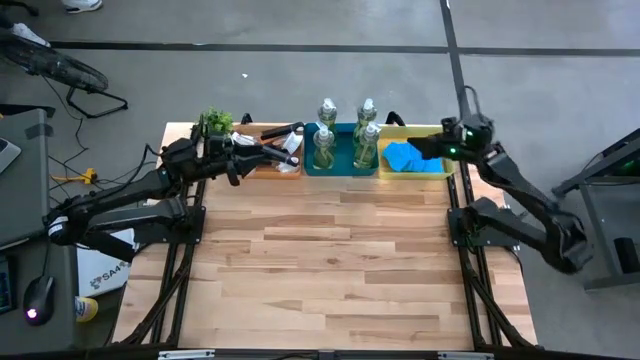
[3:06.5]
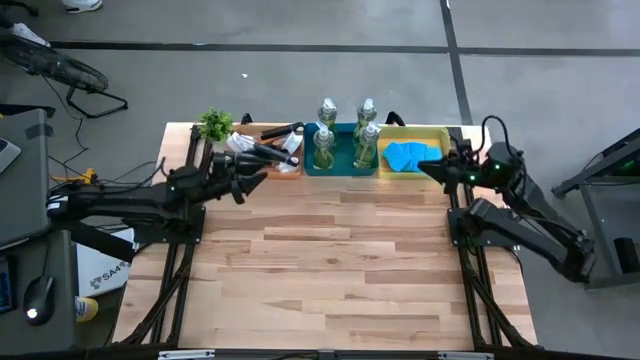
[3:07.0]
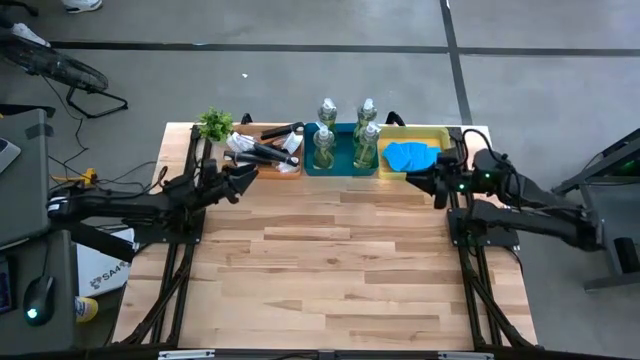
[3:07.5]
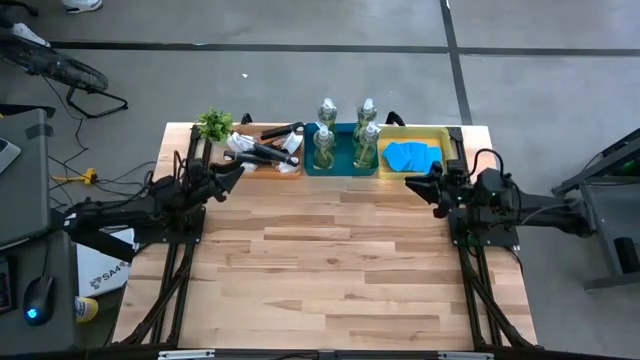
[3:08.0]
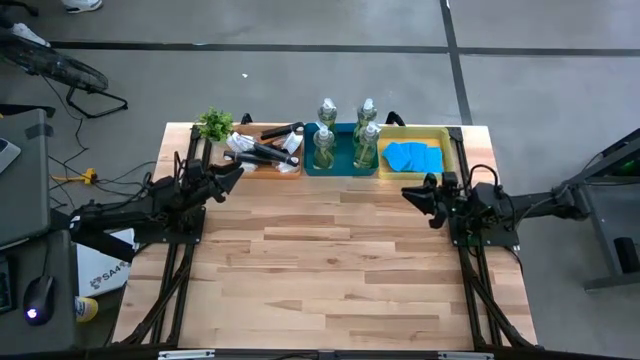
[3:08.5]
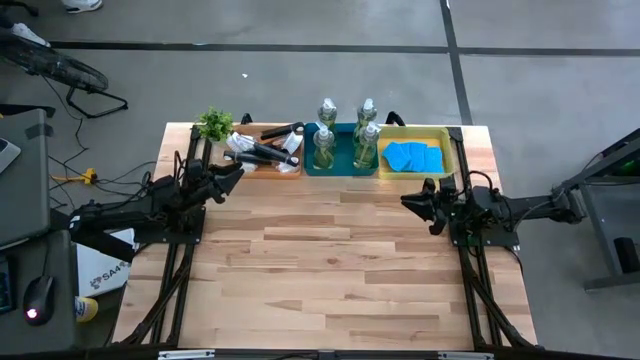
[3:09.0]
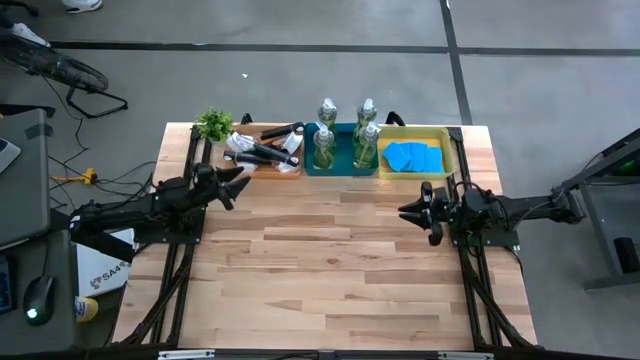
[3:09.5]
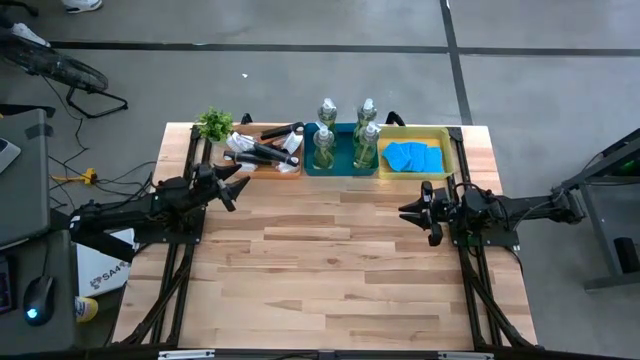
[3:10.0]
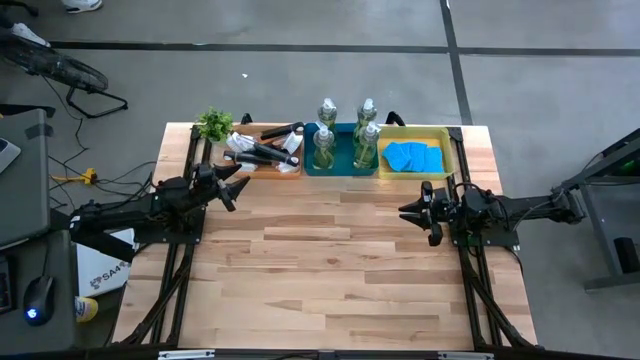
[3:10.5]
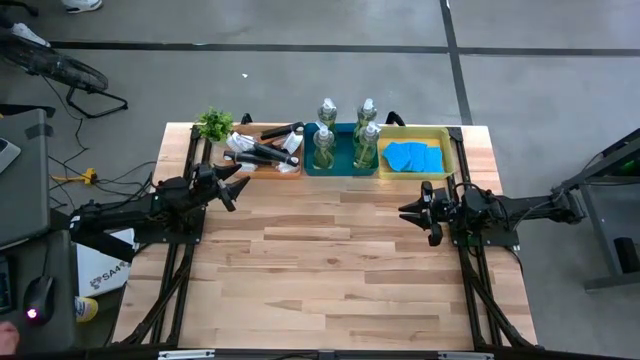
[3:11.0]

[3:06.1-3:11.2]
Task: Pick & Place Kitchen Sink Supplies
Return to Home Position

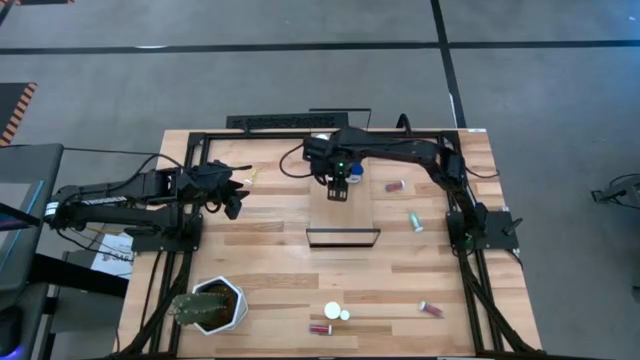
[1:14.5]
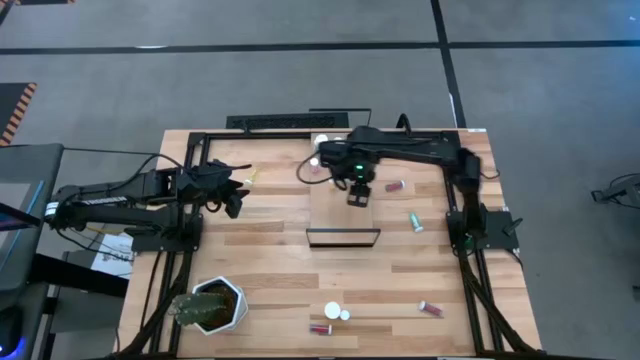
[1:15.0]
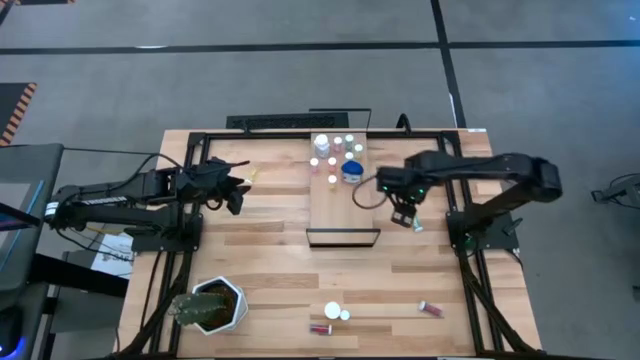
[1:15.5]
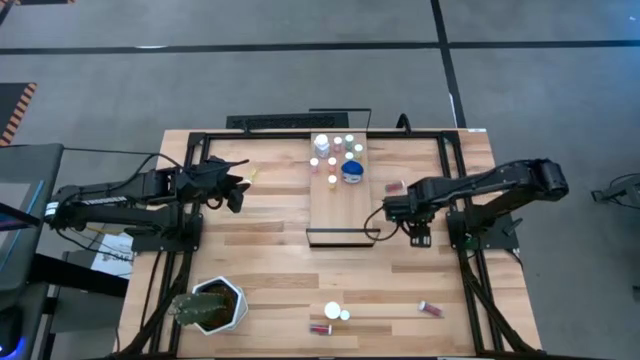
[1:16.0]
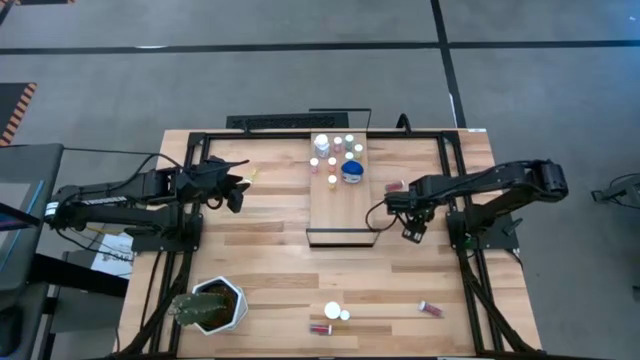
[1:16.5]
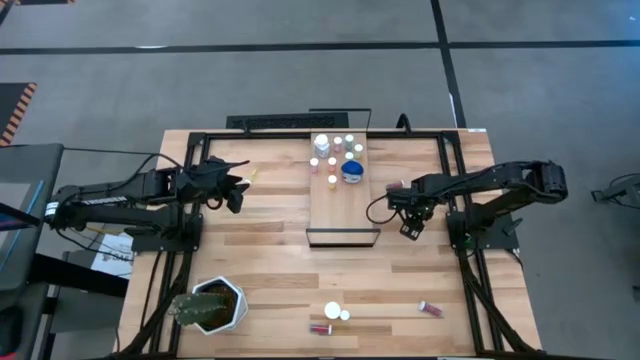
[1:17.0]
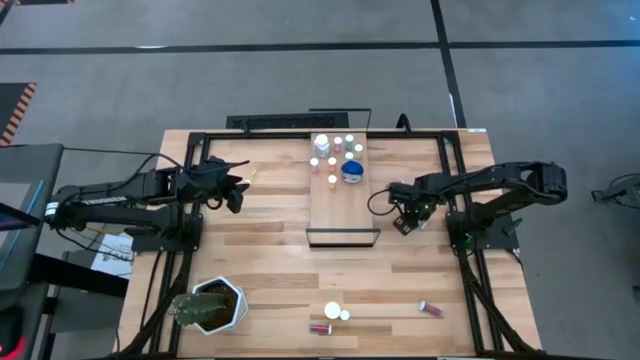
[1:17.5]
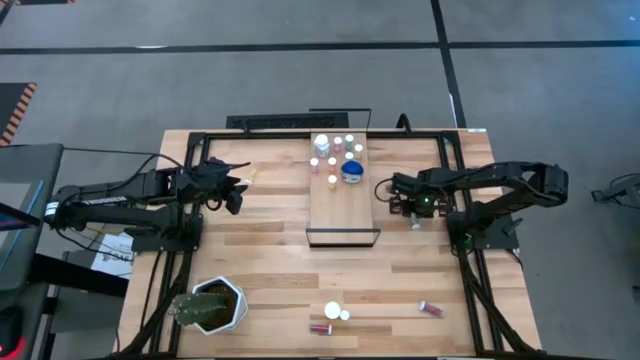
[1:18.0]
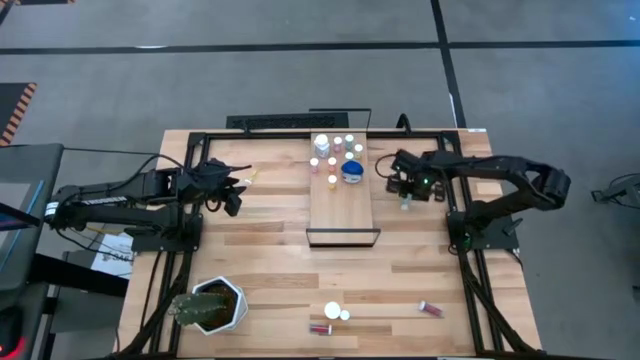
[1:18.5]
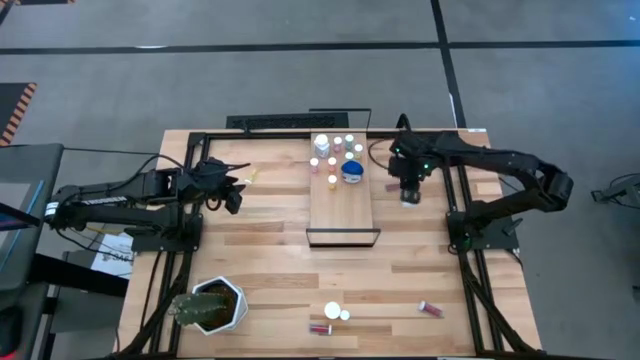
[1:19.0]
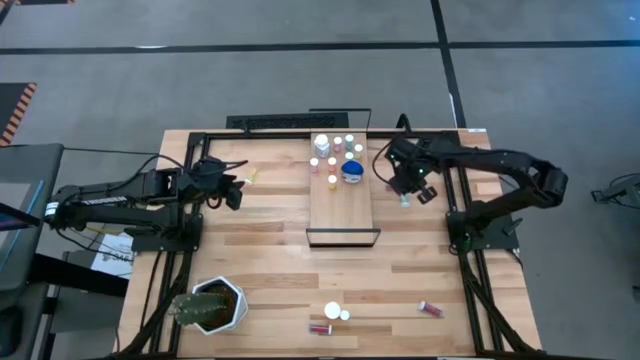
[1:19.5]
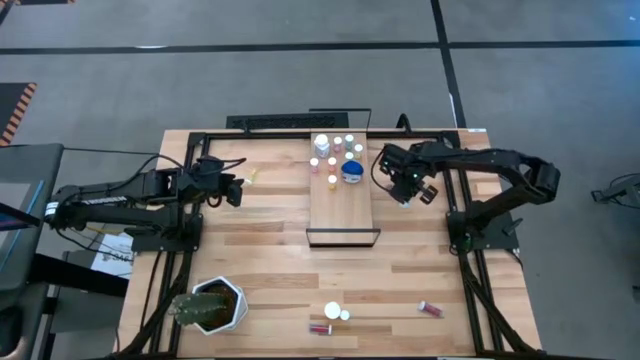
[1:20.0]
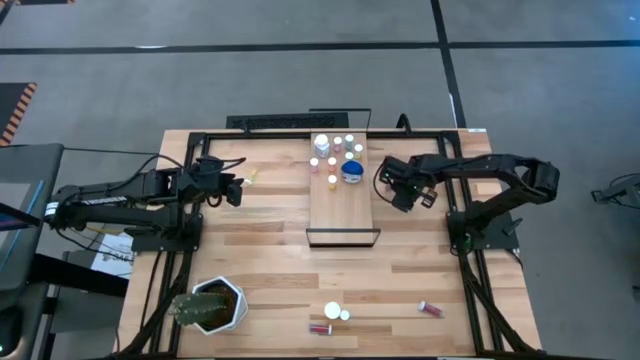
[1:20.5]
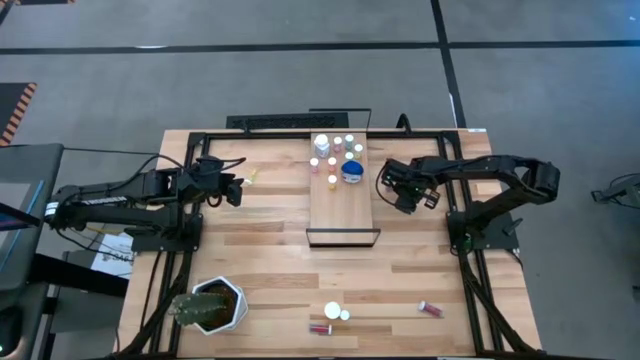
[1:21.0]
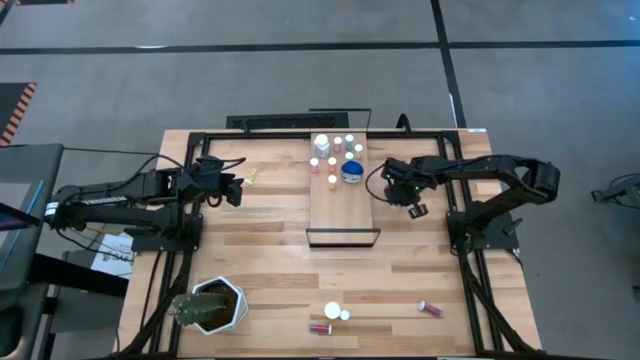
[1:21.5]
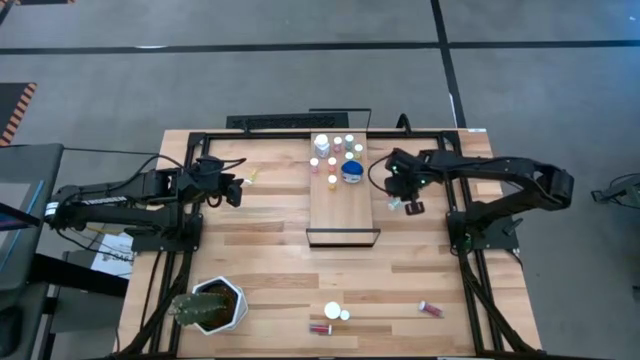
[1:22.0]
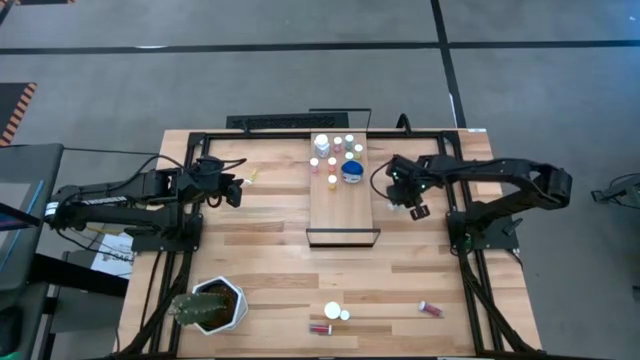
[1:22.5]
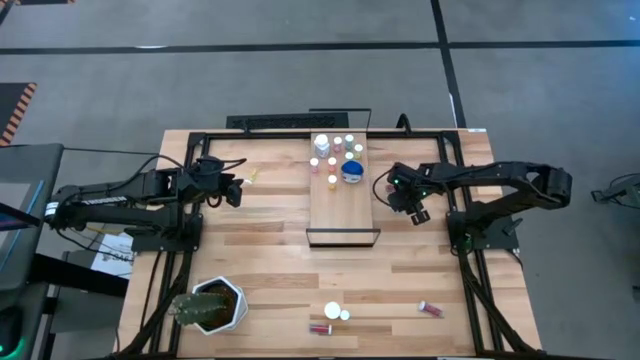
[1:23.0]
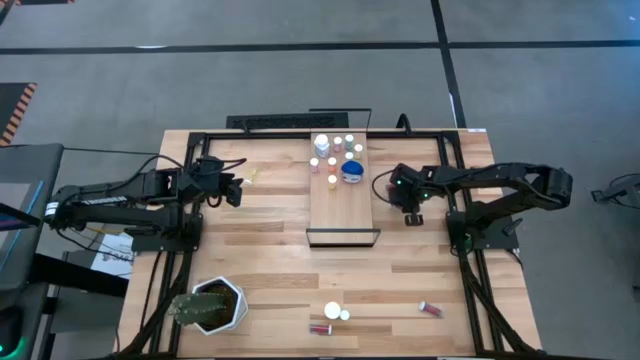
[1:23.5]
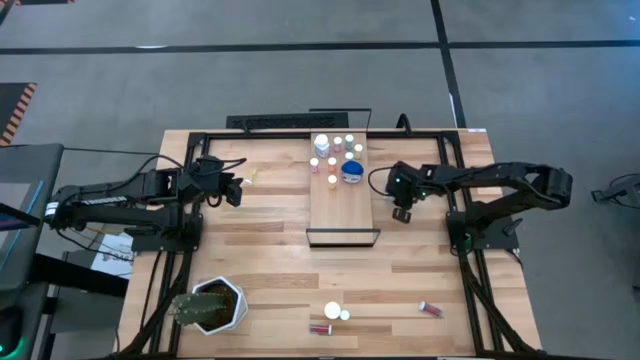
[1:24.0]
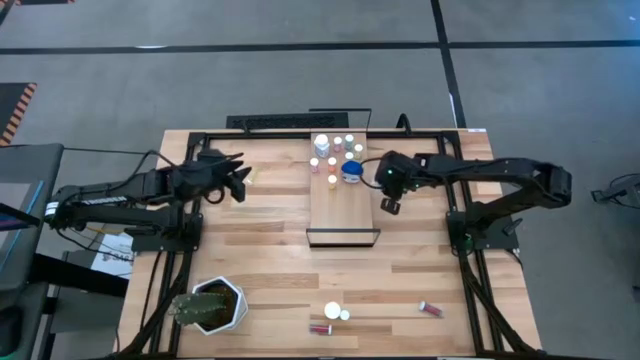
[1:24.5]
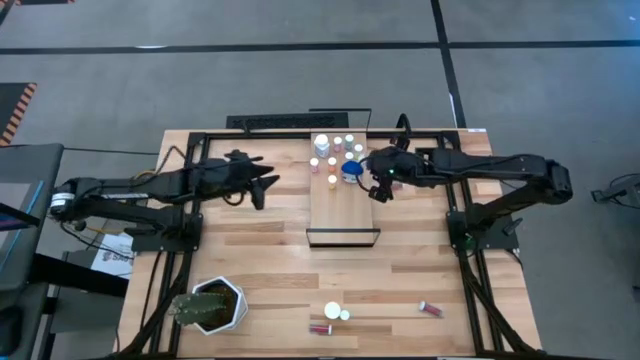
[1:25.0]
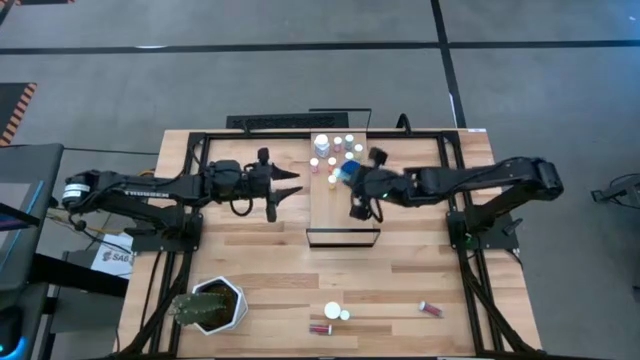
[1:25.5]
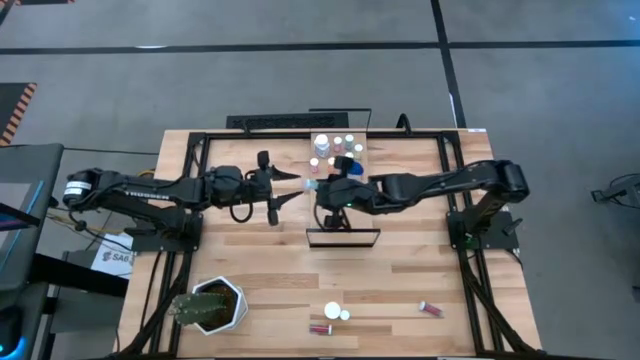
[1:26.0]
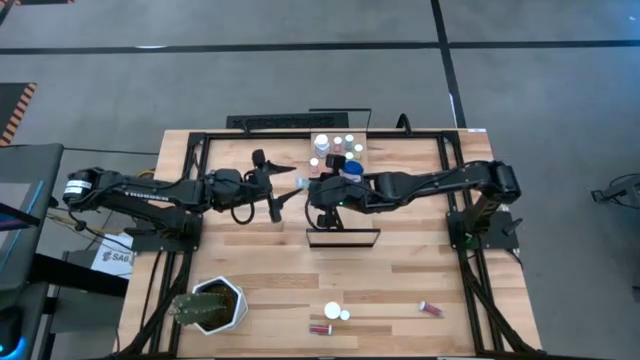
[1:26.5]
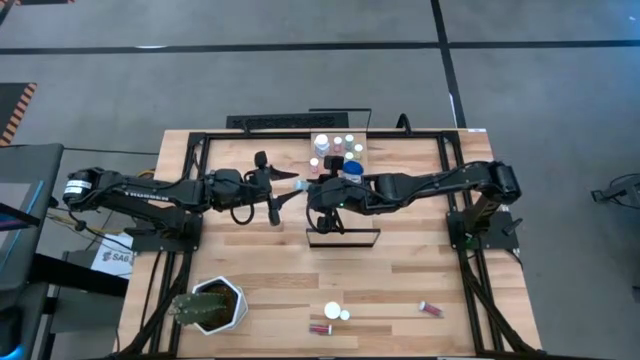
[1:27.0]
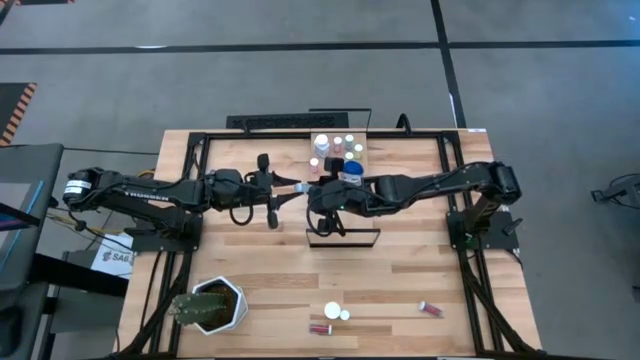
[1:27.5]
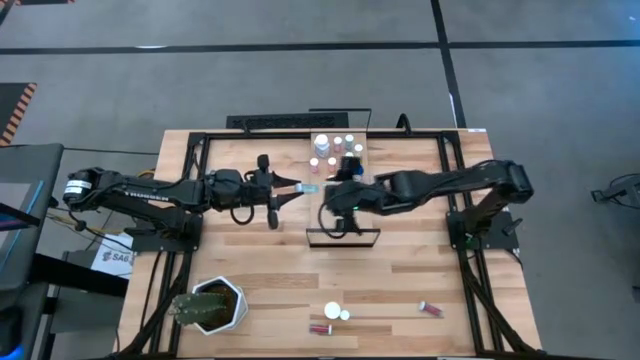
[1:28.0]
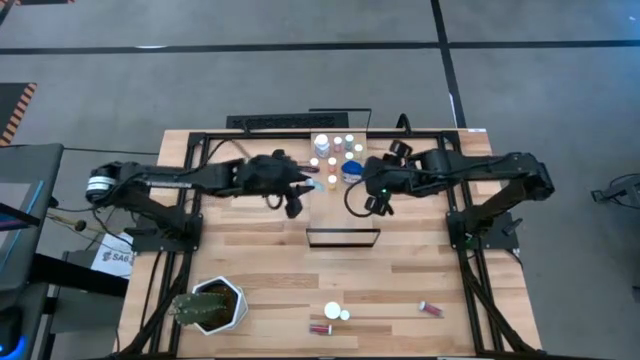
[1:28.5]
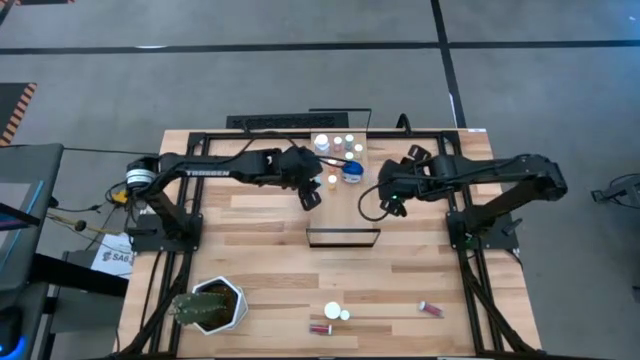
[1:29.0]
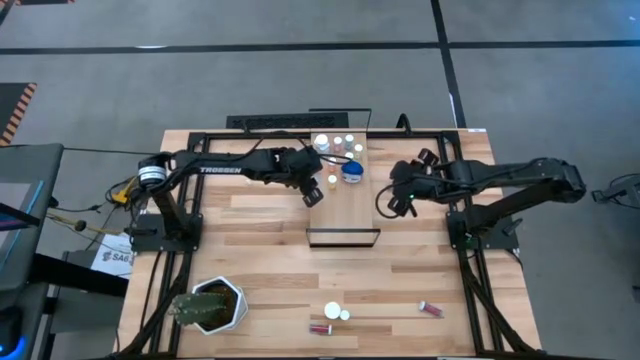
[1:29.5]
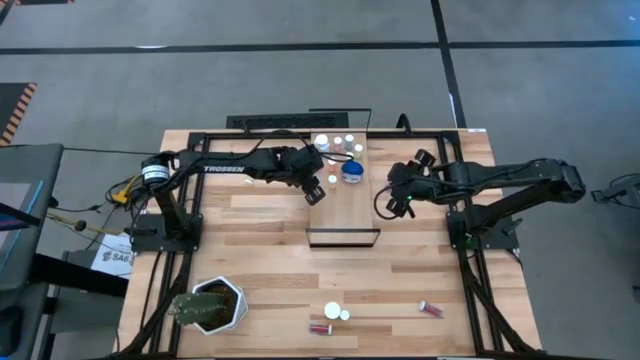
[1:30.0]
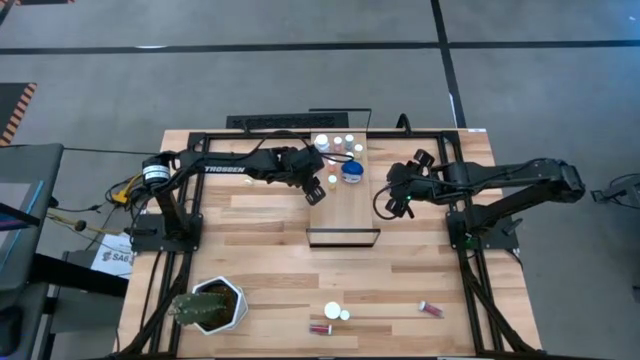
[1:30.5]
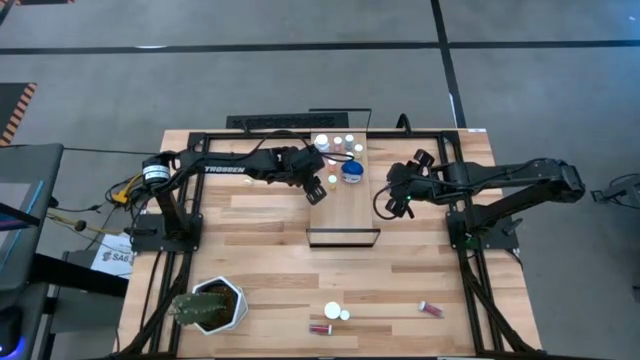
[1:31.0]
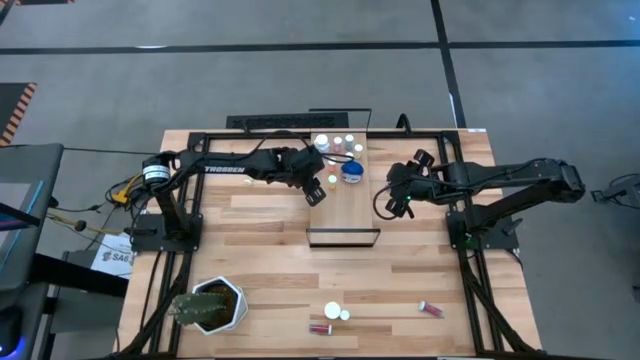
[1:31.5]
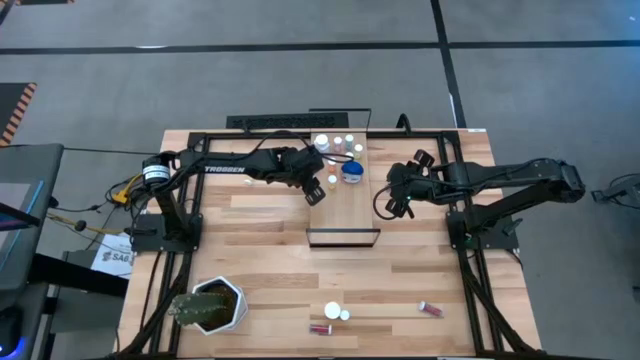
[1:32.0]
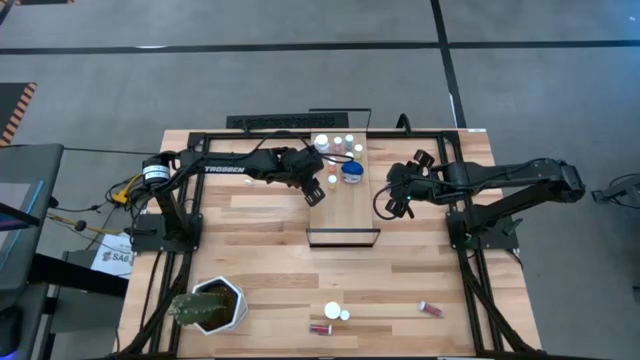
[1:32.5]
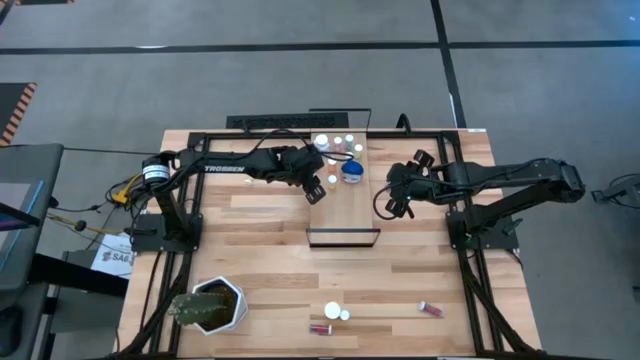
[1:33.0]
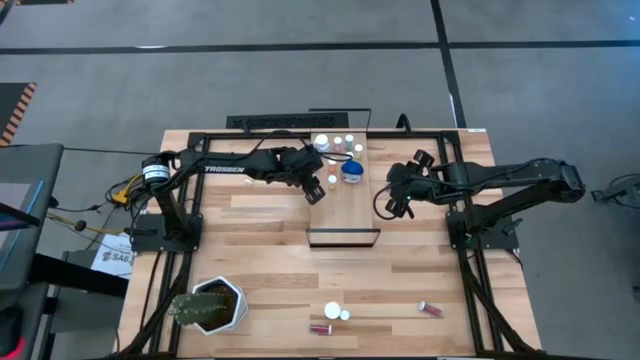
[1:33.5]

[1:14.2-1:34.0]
Task: Pick and place medicine bottles onto shelf by color
Put the green pill bottle on the shelf
